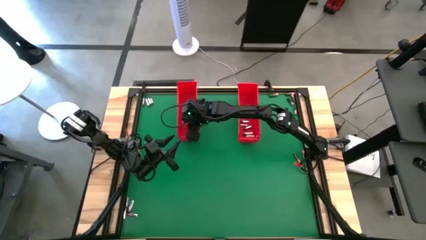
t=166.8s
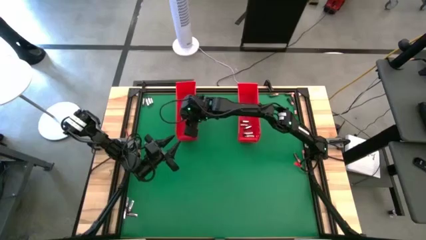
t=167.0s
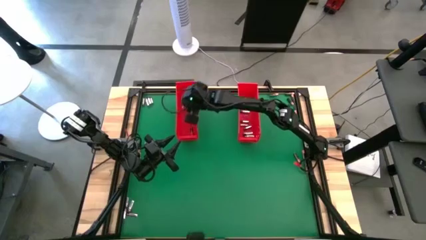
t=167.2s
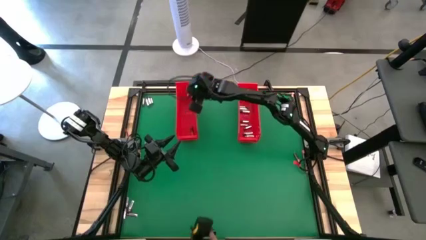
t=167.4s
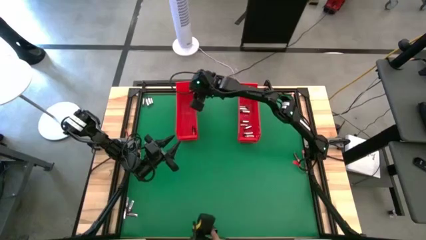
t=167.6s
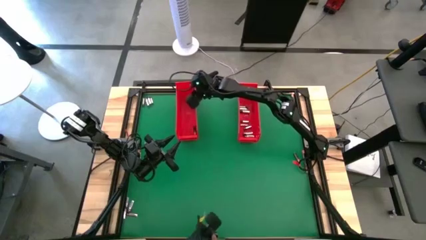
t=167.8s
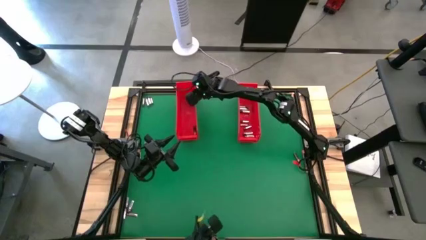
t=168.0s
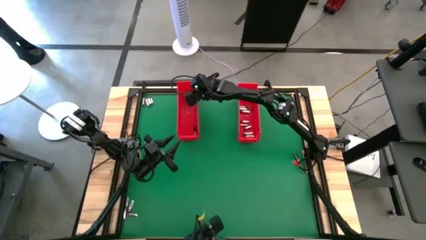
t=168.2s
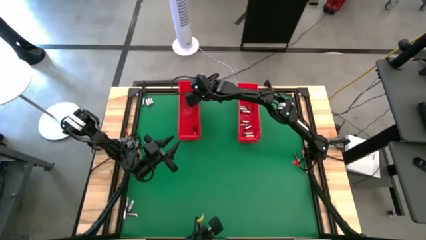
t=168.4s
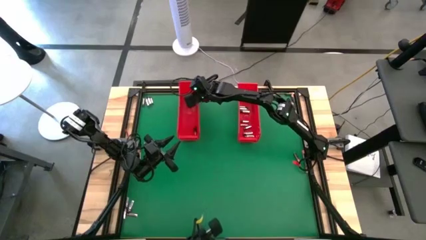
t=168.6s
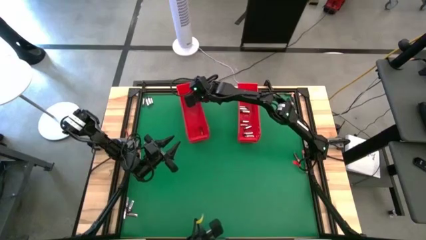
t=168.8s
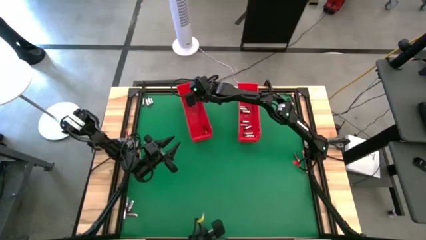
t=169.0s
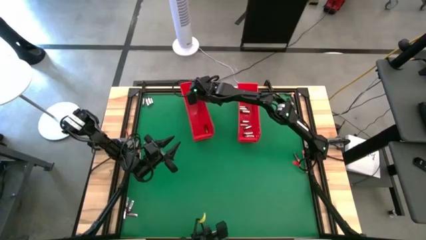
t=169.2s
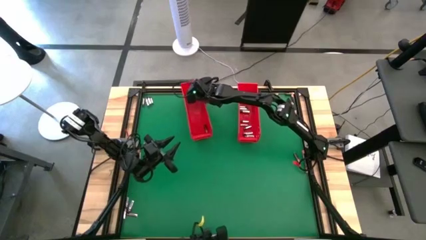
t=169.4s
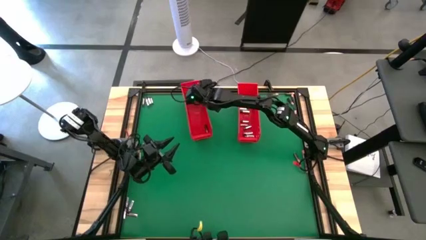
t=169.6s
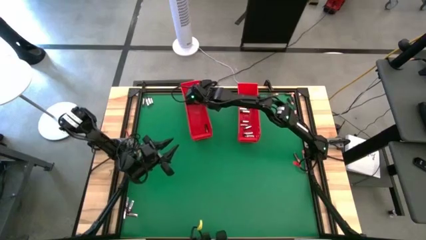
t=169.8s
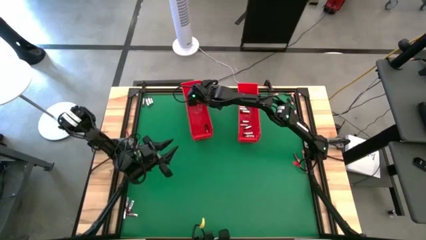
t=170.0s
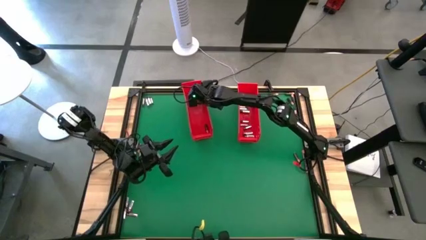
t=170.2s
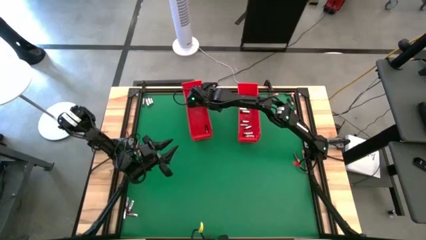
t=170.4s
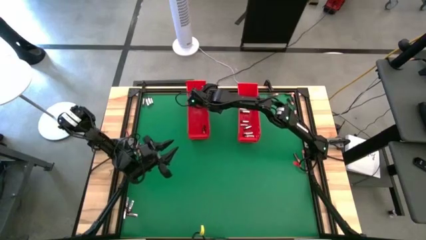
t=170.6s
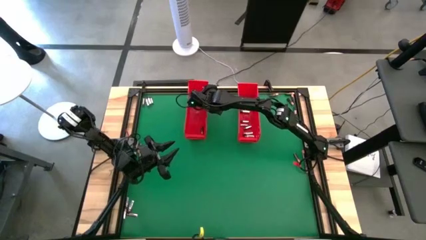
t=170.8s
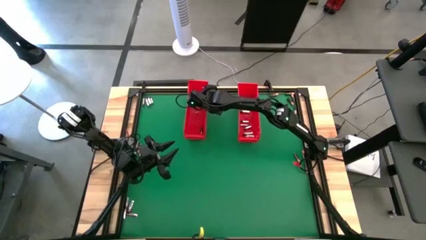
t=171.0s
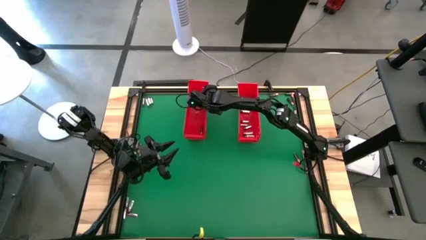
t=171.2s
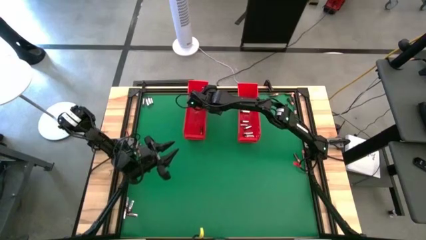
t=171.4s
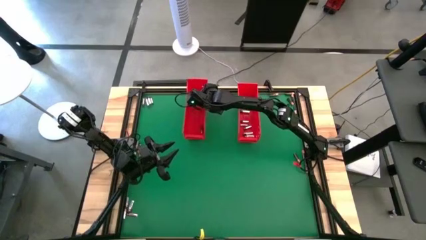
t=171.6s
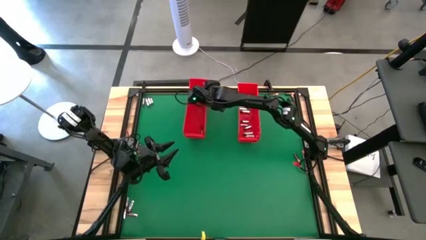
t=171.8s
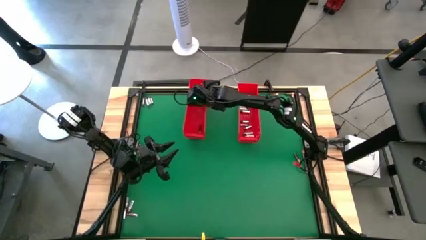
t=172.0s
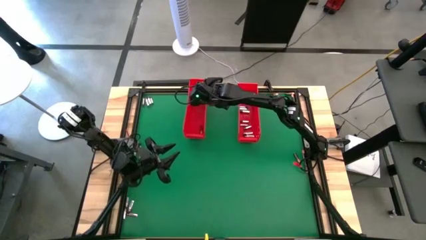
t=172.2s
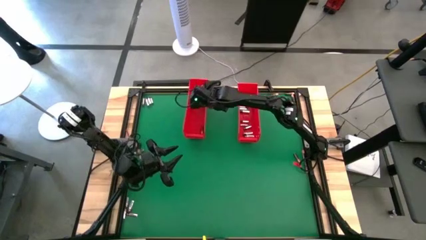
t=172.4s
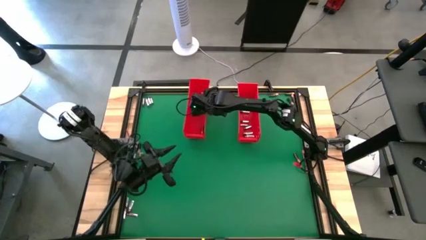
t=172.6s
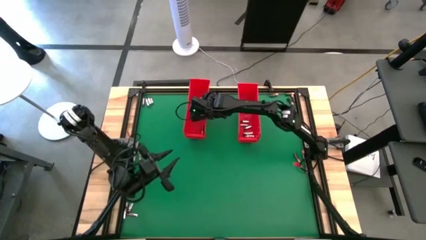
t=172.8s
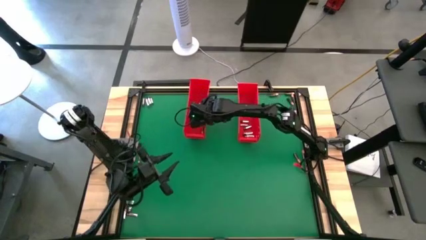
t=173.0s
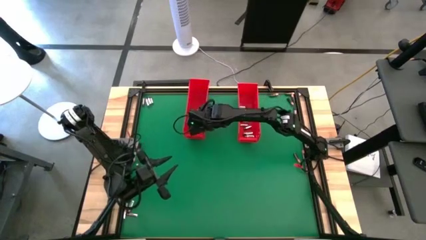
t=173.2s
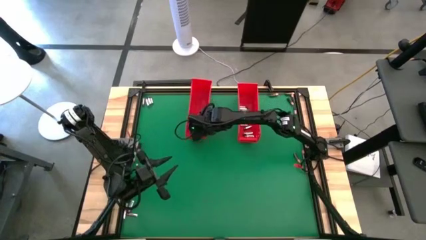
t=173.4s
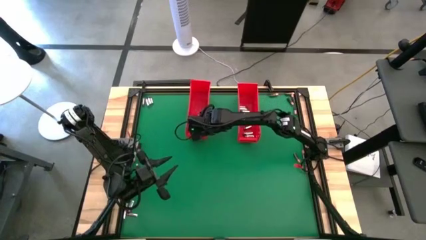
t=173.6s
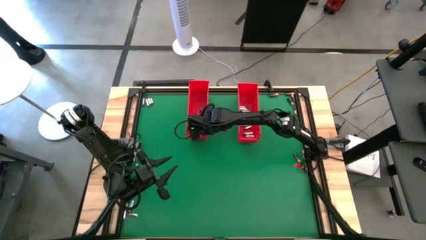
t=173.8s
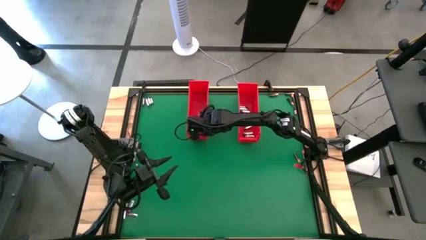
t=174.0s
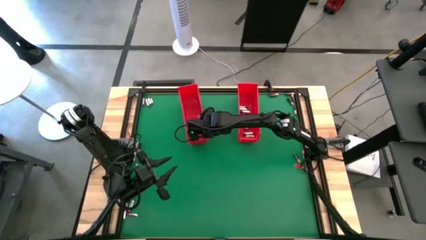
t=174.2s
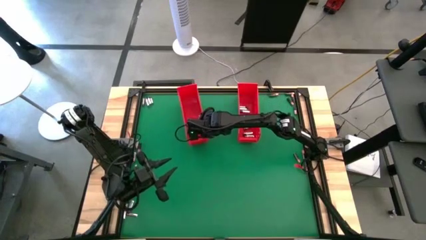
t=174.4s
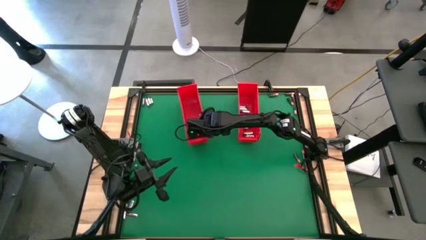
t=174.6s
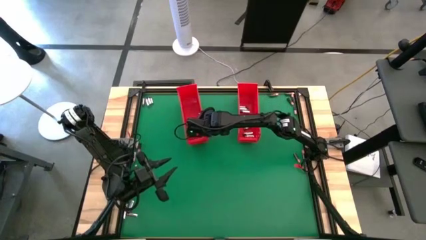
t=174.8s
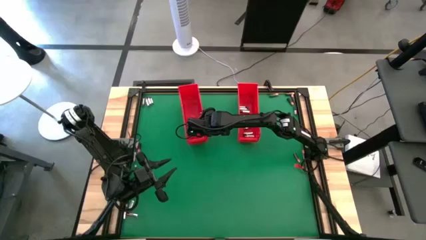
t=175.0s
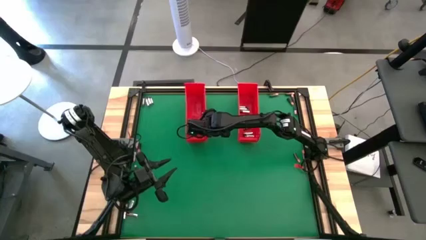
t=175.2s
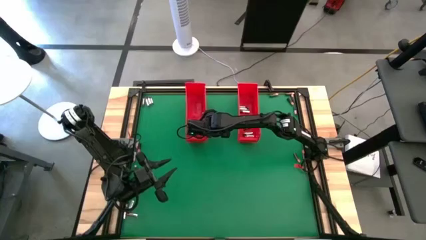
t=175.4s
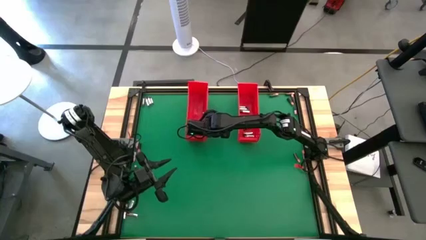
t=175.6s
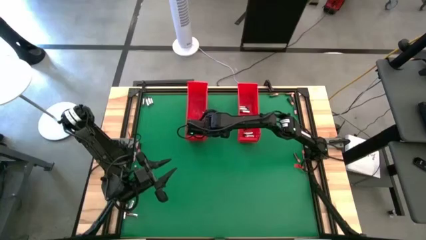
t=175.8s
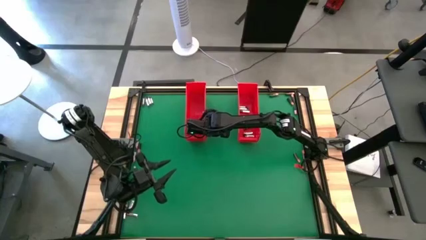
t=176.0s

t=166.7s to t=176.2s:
Task: Sort batteries
Adjust the left red bin

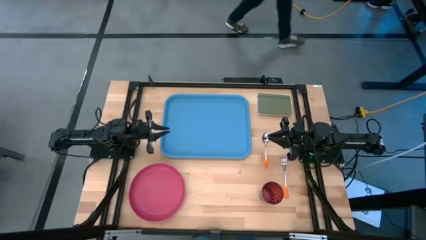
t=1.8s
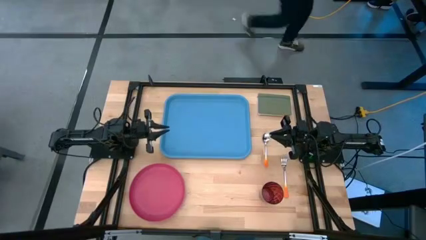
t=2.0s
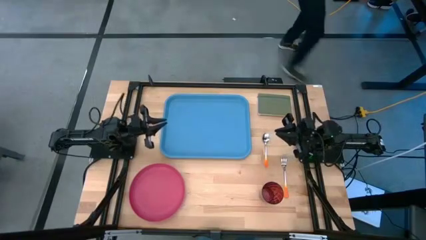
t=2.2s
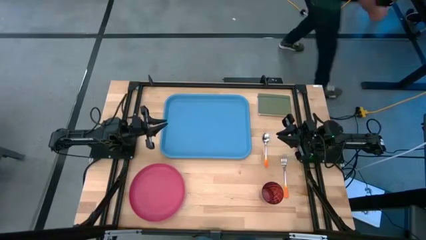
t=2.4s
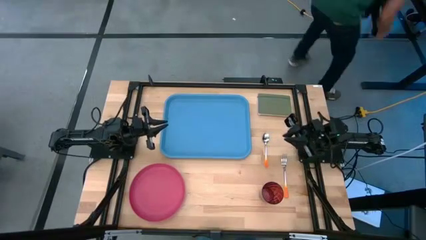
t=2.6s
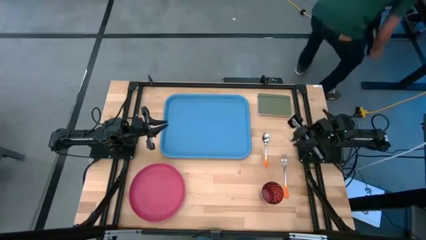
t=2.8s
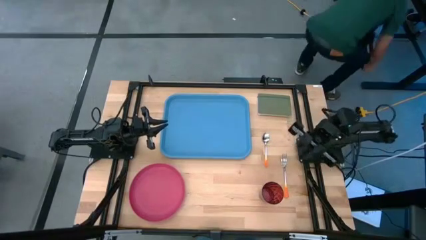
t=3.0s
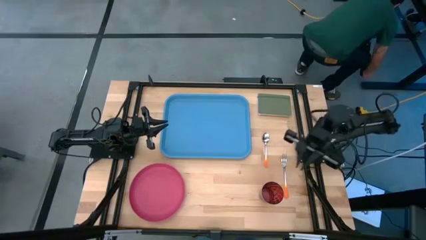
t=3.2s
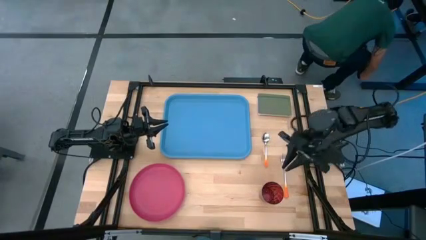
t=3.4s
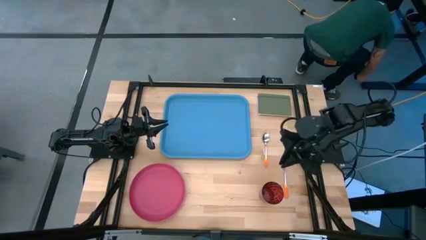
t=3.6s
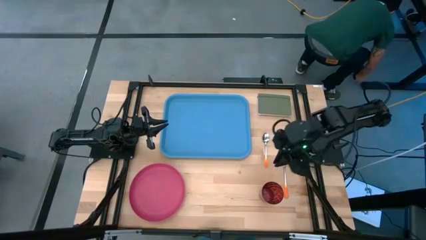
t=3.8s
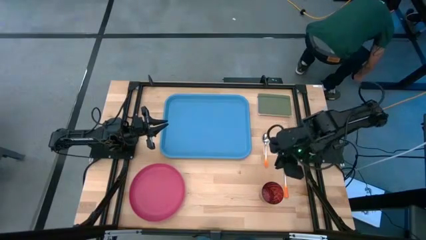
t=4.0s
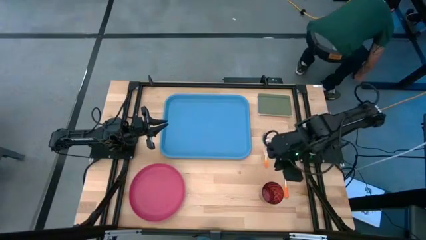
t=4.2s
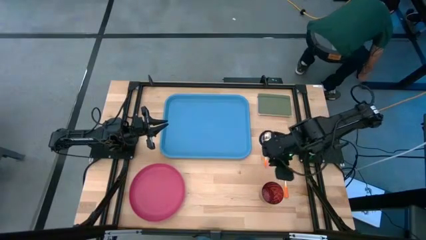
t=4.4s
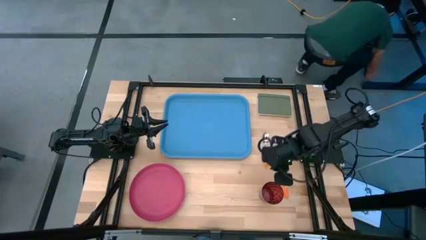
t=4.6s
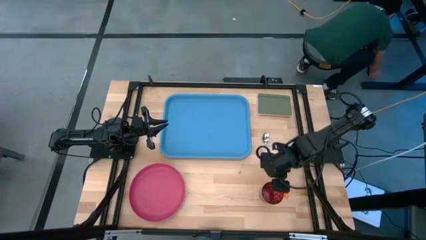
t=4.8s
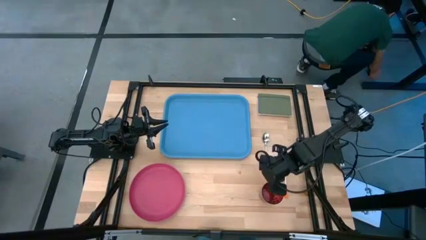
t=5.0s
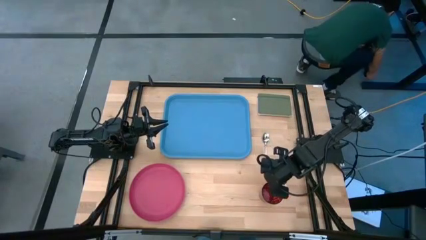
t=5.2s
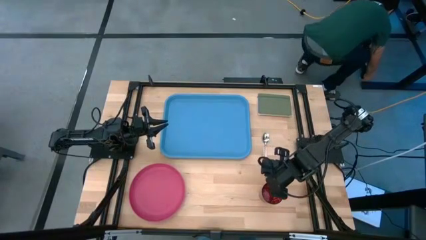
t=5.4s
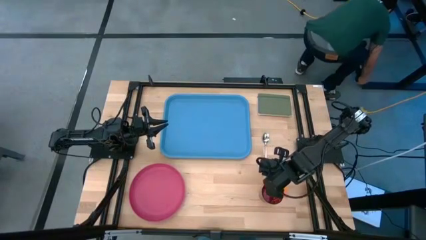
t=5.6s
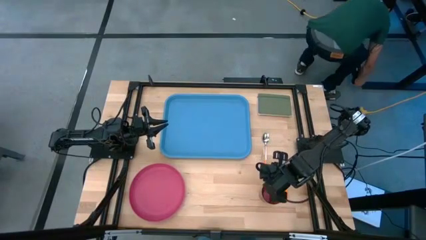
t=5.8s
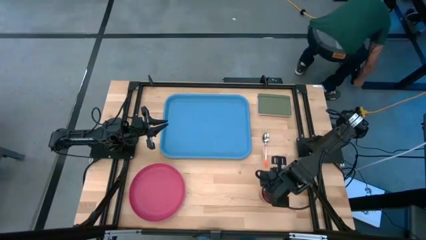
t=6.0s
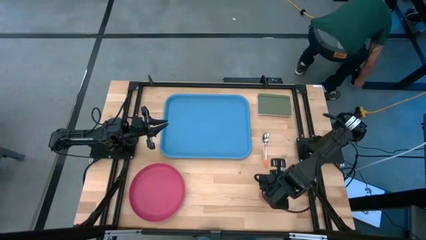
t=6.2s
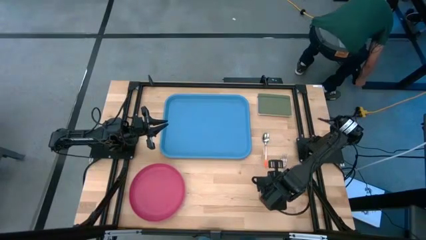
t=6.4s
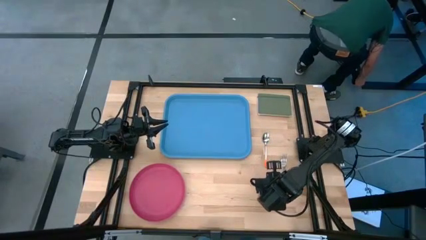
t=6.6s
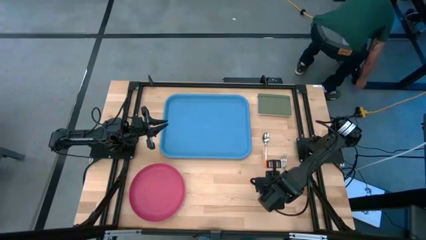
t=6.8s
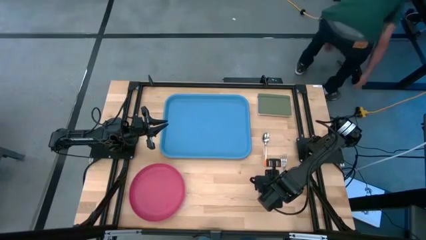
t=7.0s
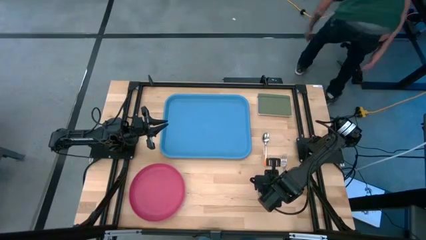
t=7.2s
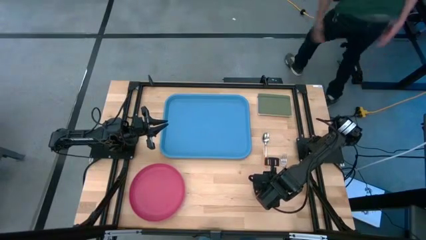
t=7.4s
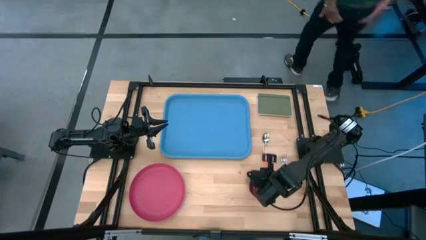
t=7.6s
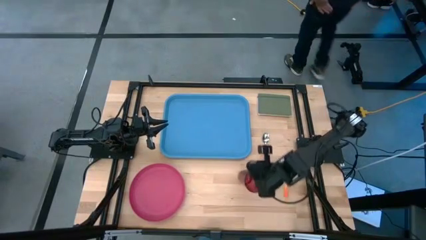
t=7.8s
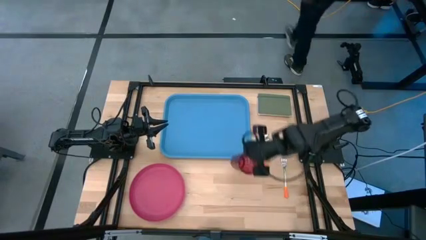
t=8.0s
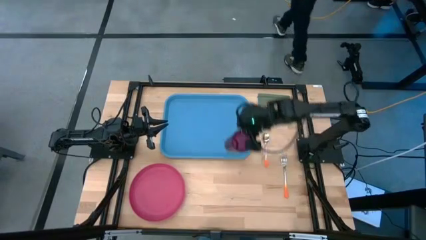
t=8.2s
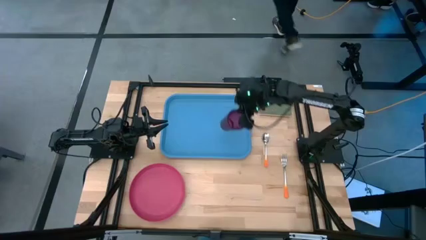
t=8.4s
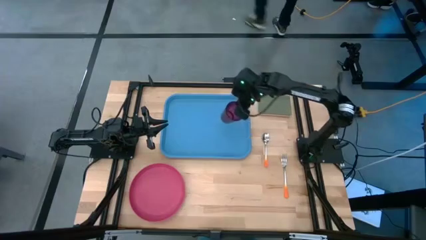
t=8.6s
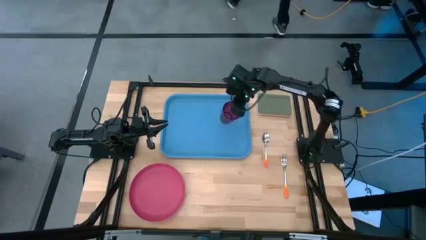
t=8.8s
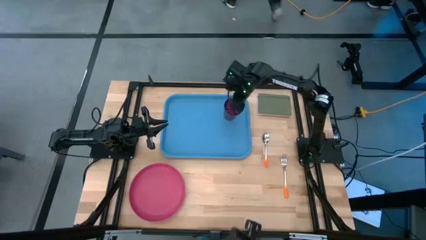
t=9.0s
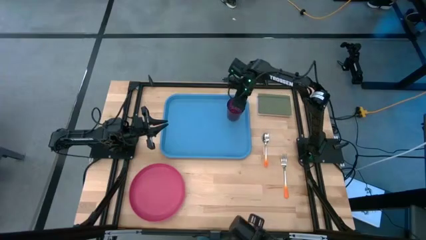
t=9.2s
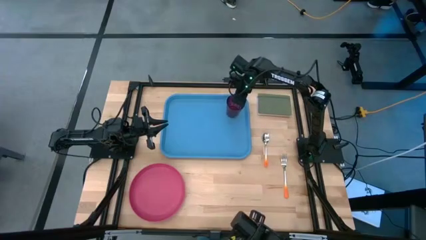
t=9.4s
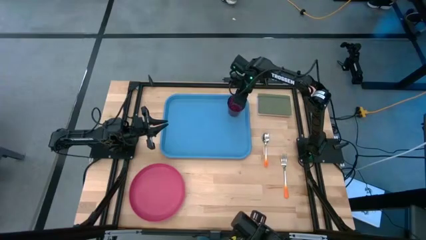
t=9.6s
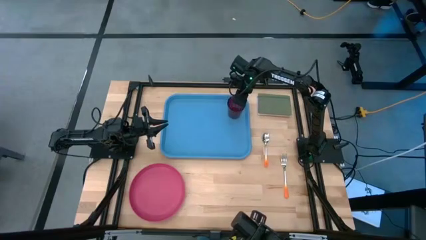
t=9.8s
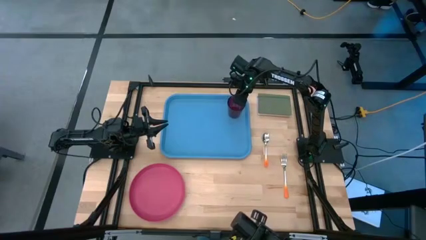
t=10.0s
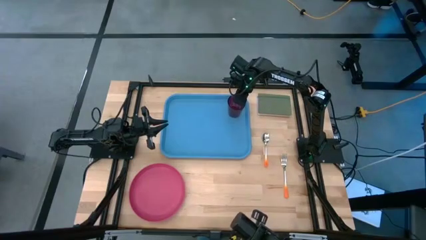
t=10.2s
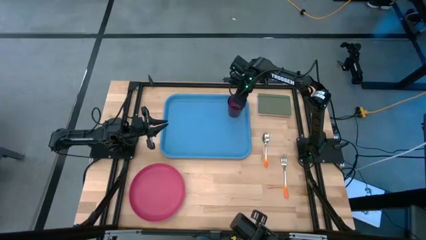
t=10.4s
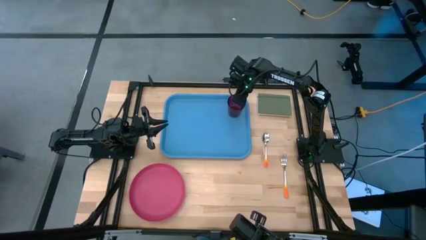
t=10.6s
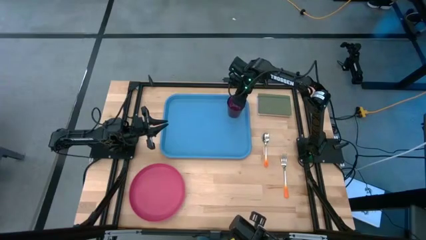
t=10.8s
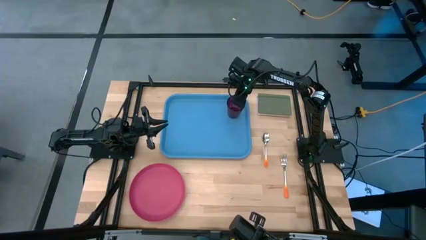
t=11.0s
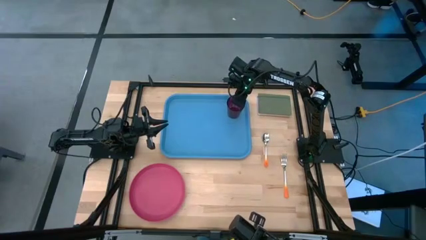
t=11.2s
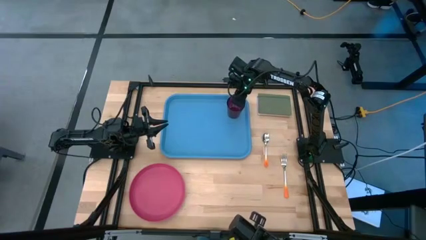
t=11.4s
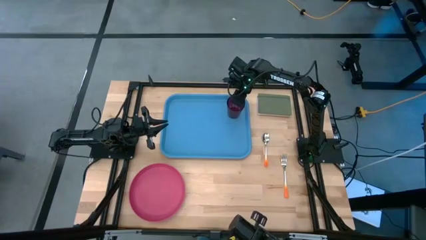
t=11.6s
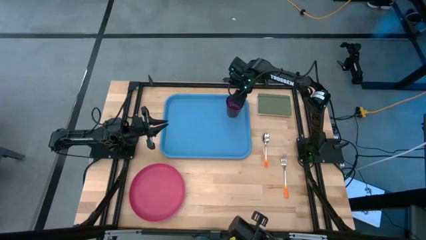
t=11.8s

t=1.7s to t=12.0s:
Task: Pick and place plate/cup/fork/spoon on tray
Put the violet cup on the blue tray
